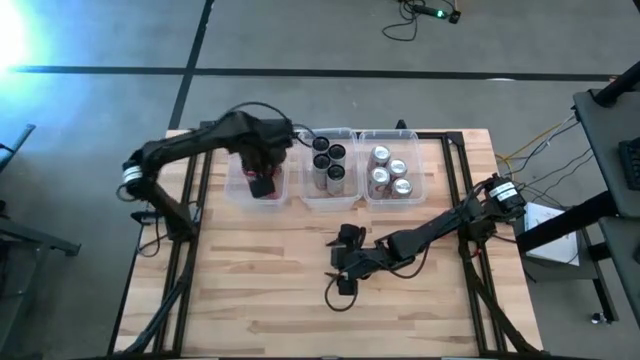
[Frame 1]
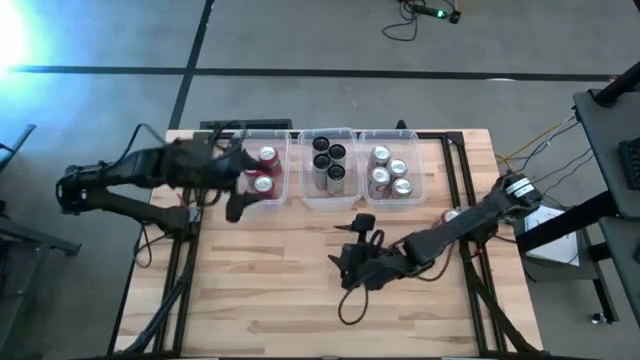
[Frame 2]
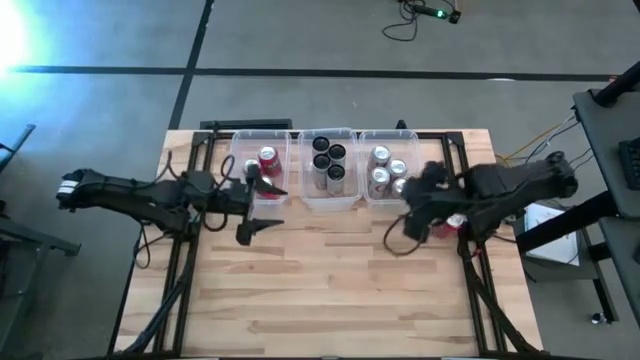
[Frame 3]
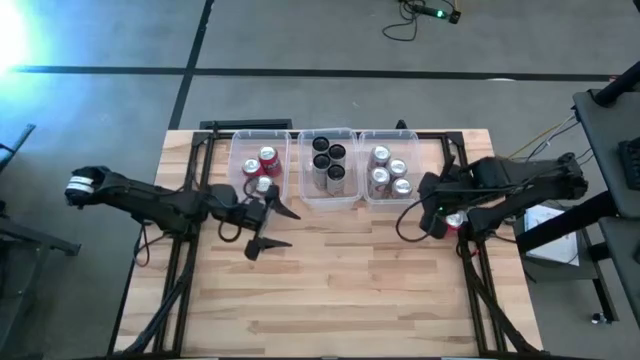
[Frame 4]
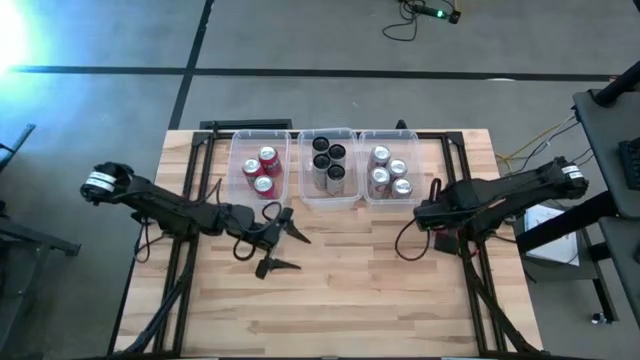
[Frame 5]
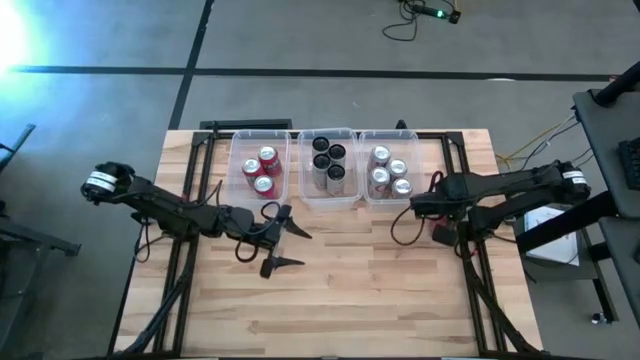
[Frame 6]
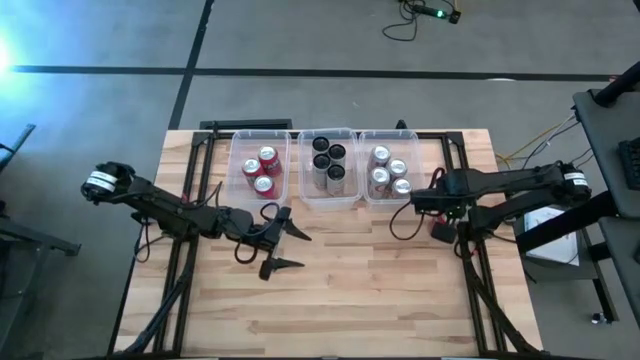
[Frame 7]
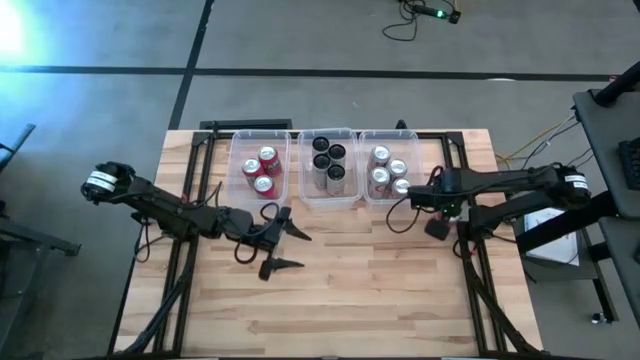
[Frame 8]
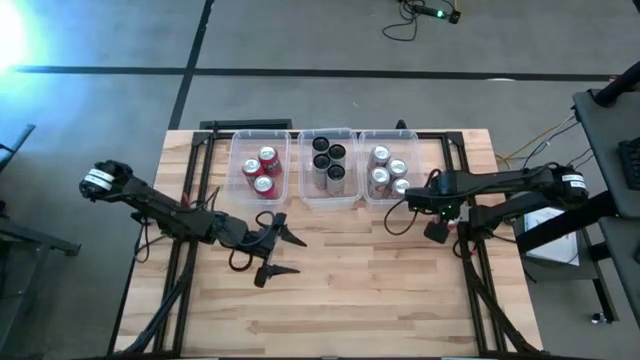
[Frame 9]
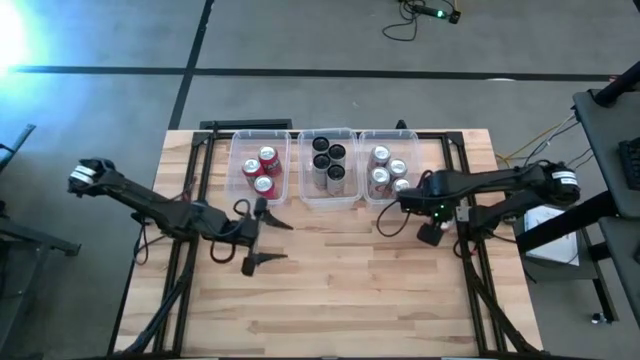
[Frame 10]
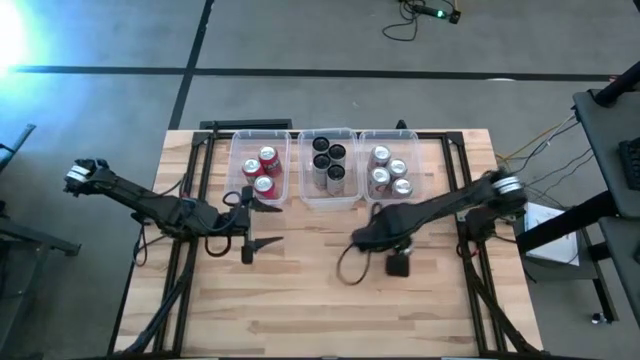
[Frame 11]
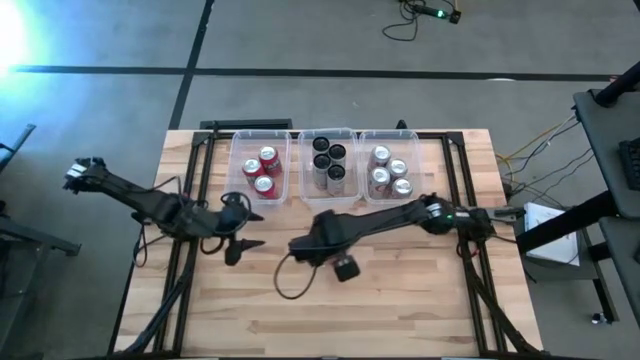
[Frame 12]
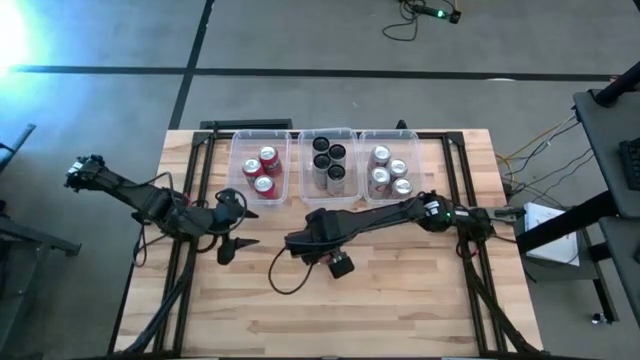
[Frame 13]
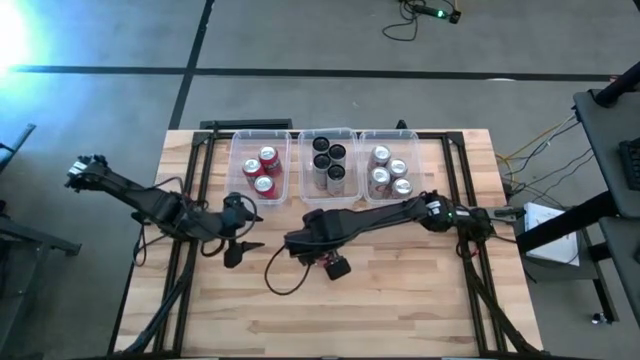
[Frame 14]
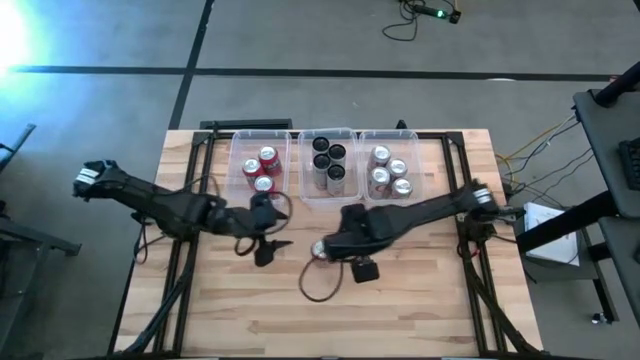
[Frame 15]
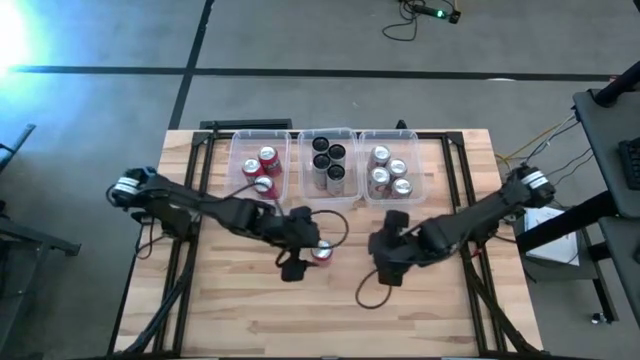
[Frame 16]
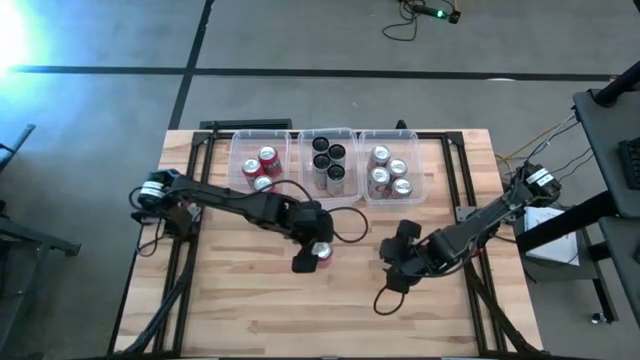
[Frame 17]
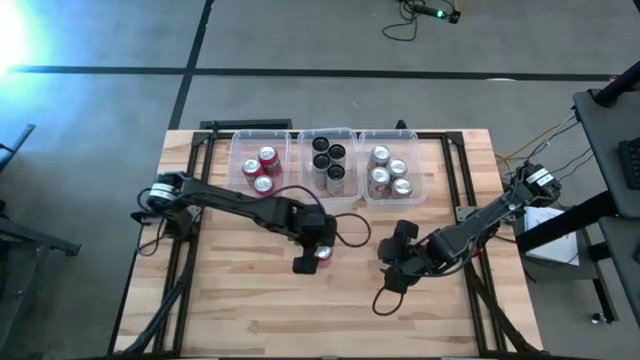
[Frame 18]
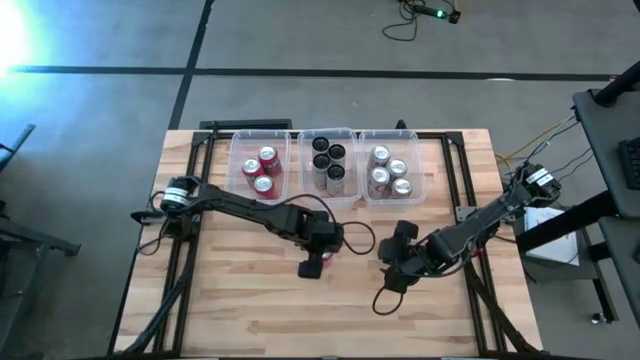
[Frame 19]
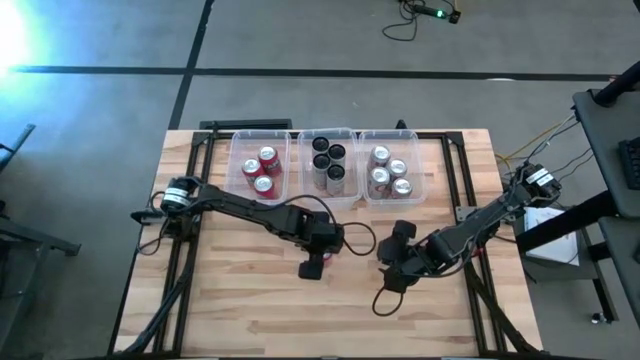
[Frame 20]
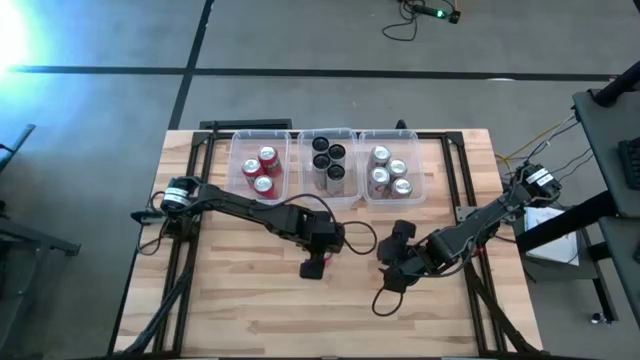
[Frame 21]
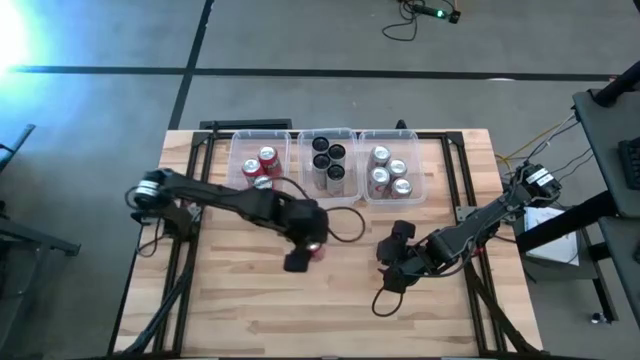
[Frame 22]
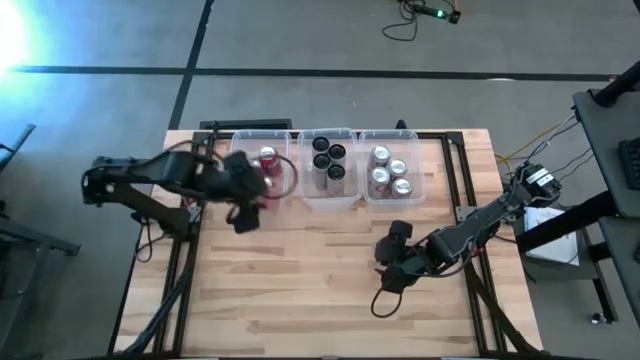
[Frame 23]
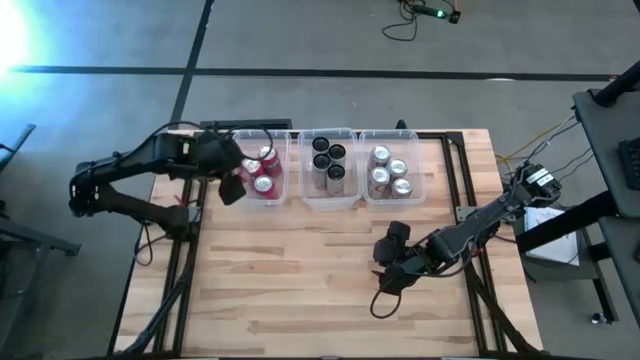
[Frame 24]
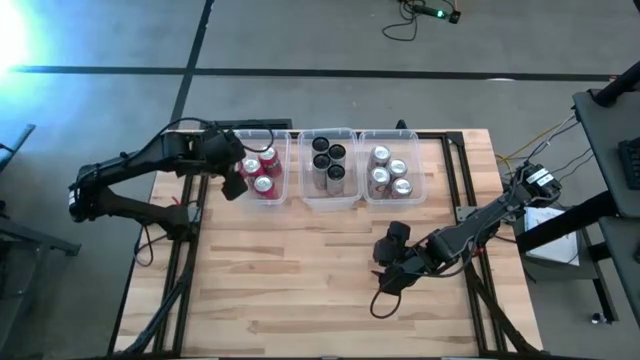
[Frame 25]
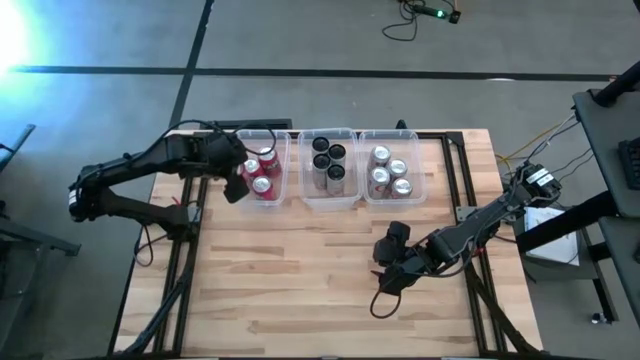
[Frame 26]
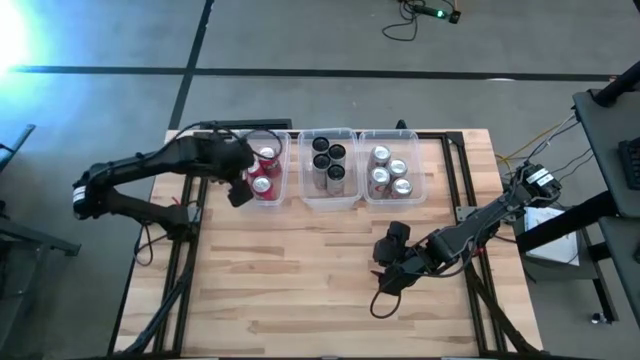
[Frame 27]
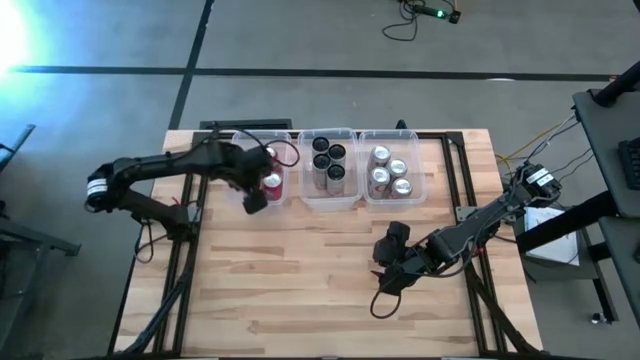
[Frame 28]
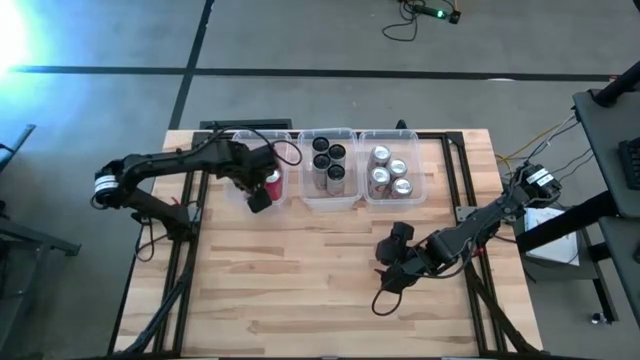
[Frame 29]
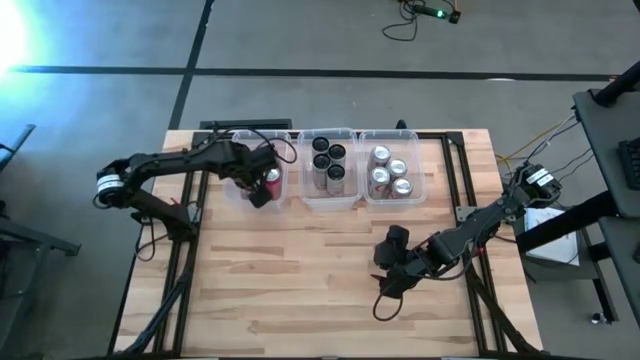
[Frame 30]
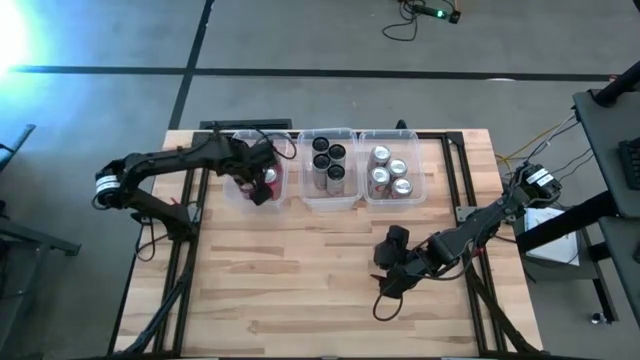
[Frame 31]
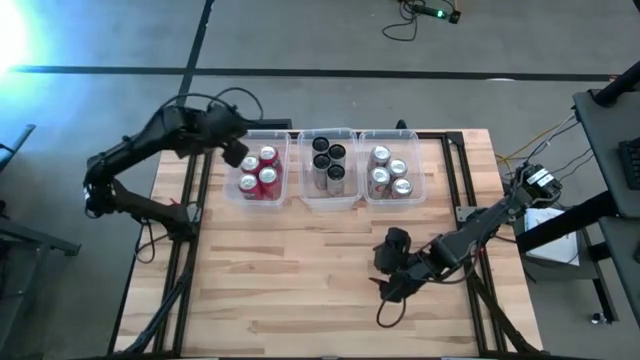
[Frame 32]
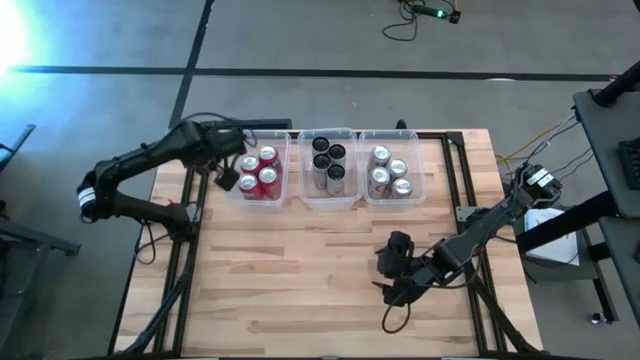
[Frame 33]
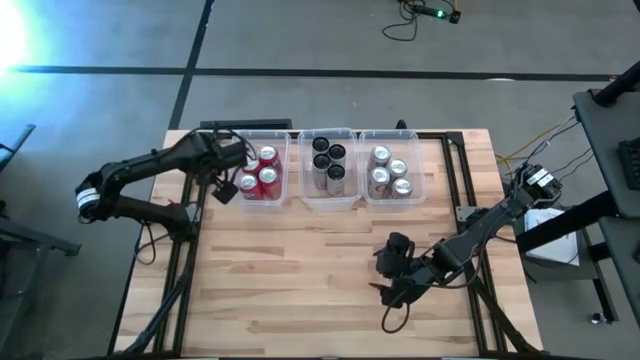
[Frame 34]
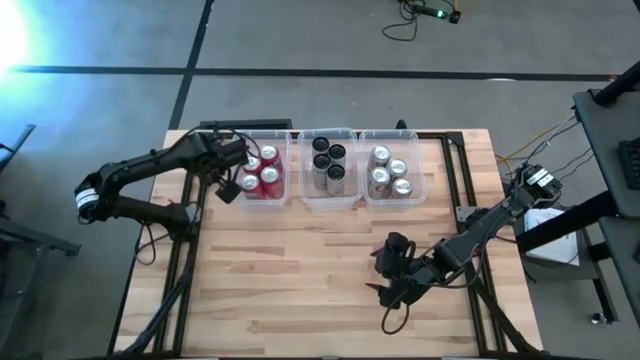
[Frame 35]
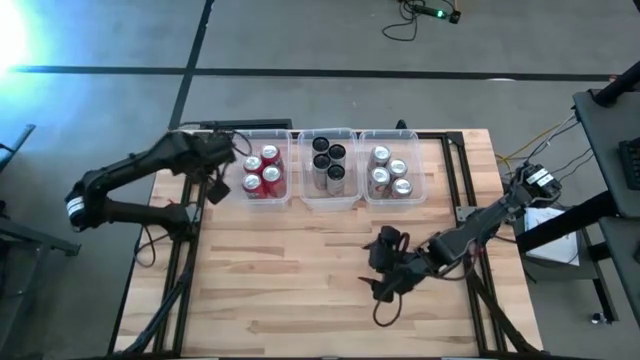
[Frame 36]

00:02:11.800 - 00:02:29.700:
Task: Sort soda cans
Put the red soda can into the left transparent bin

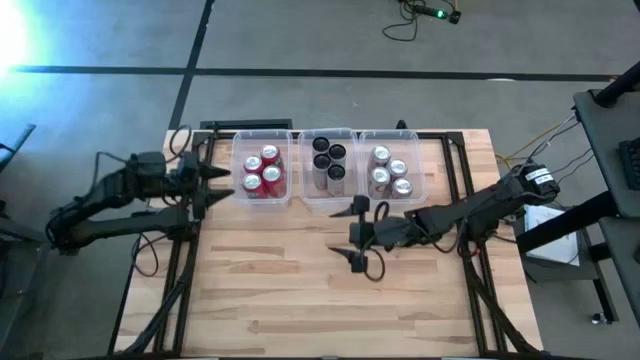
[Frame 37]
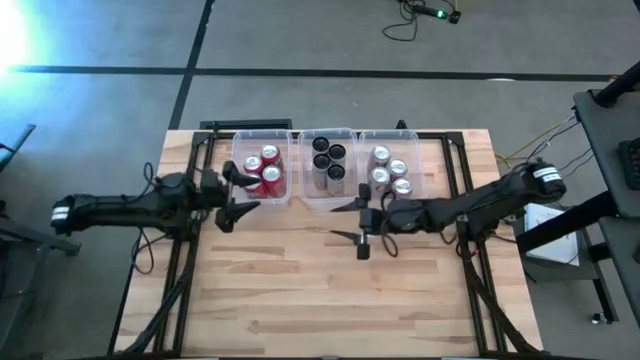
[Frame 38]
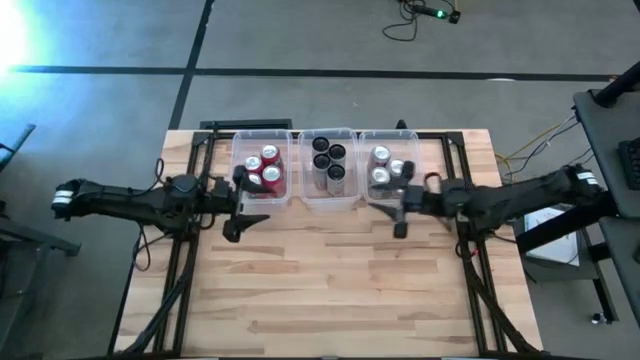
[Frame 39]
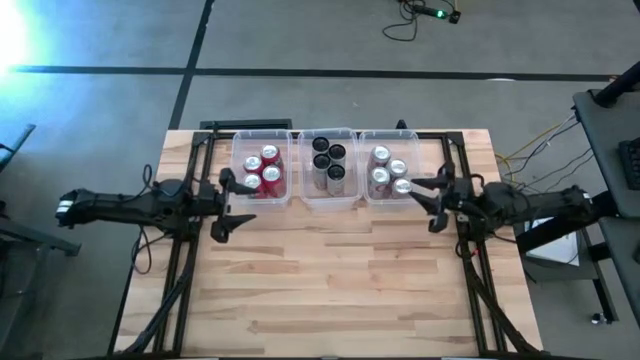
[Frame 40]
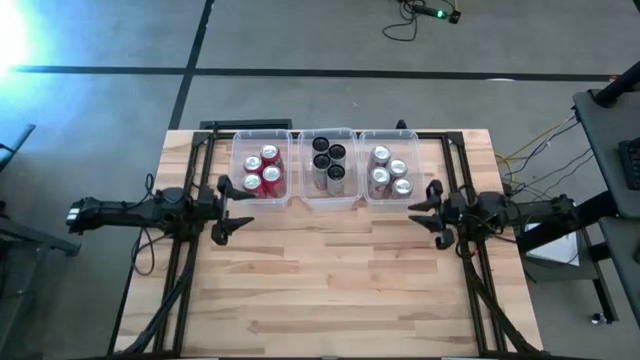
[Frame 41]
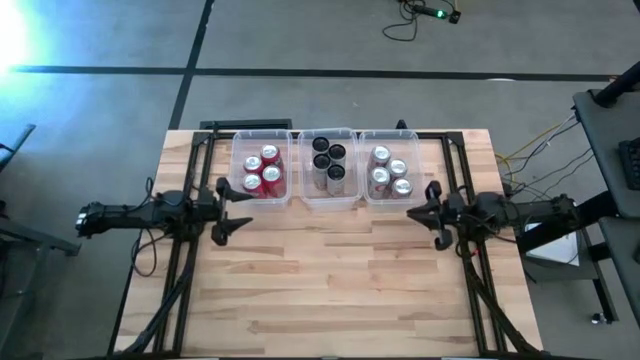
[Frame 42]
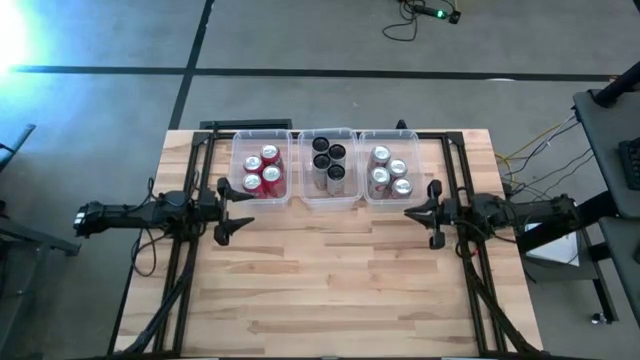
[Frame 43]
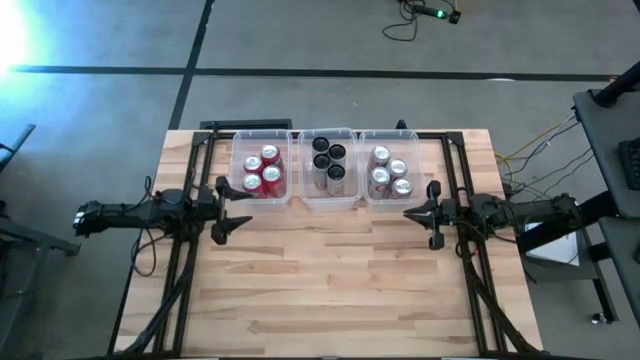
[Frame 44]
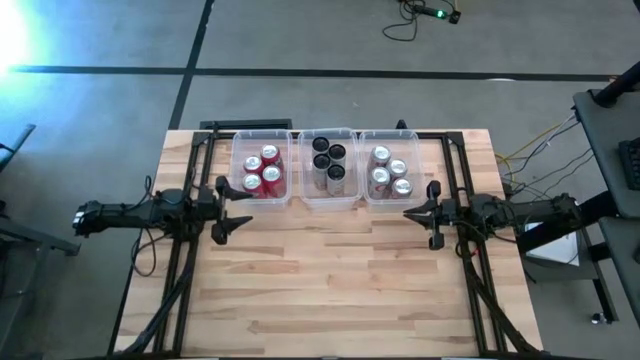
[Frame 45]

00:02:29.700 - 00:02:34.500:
Return to Home Position
